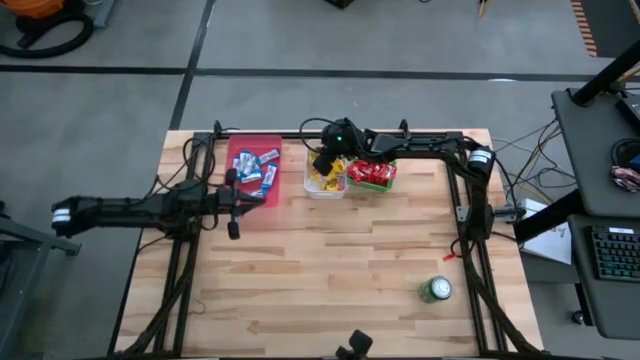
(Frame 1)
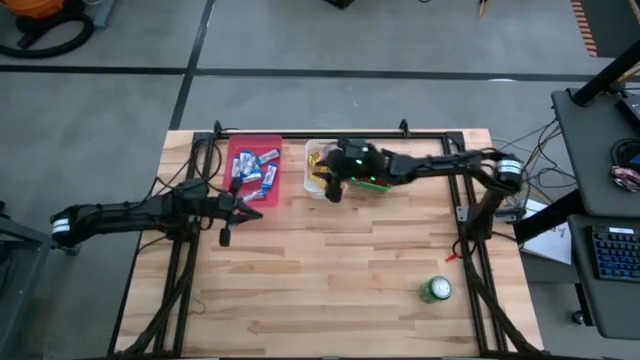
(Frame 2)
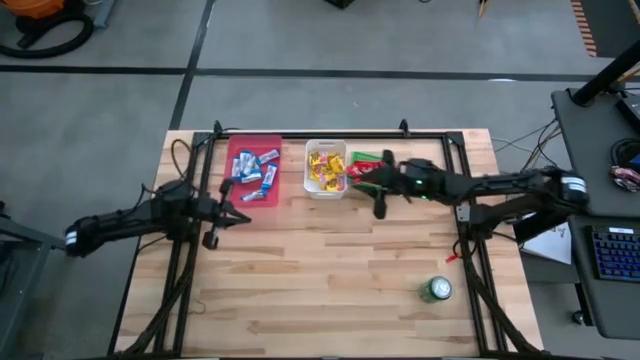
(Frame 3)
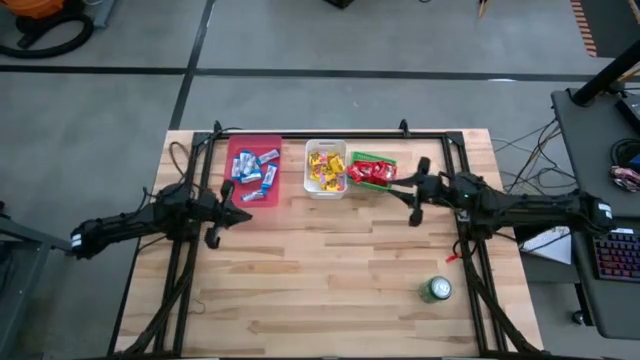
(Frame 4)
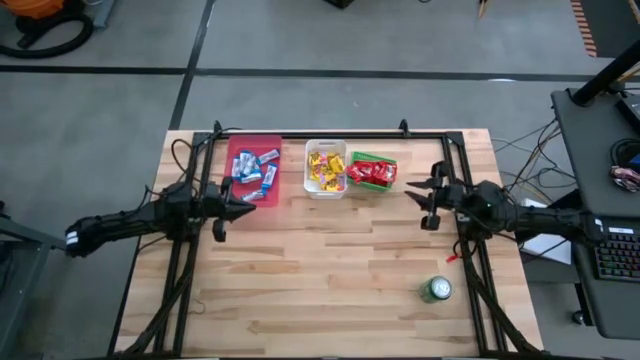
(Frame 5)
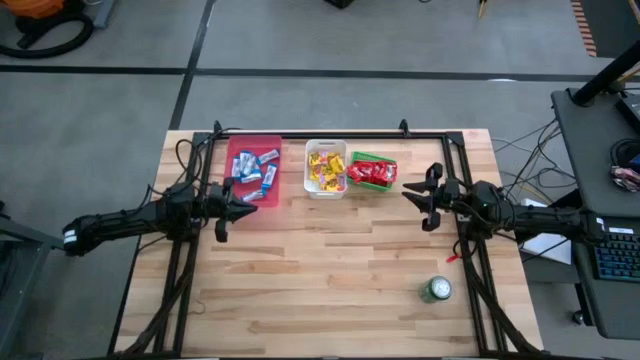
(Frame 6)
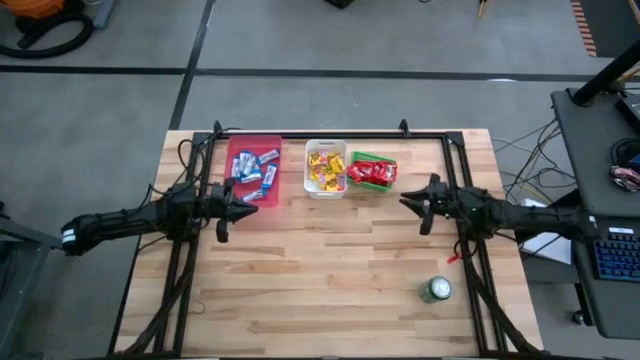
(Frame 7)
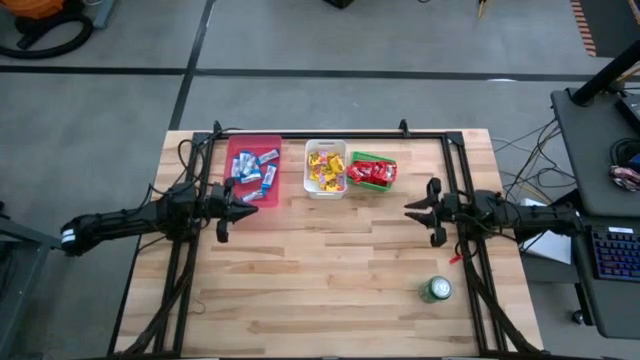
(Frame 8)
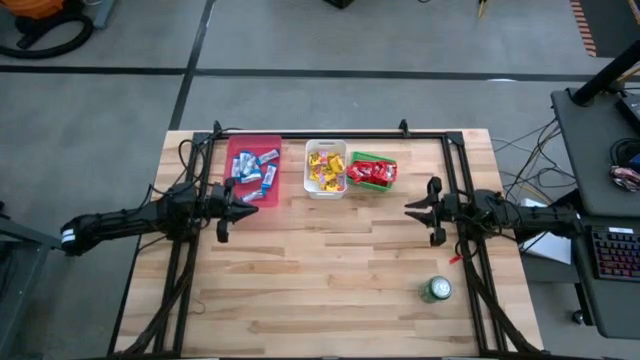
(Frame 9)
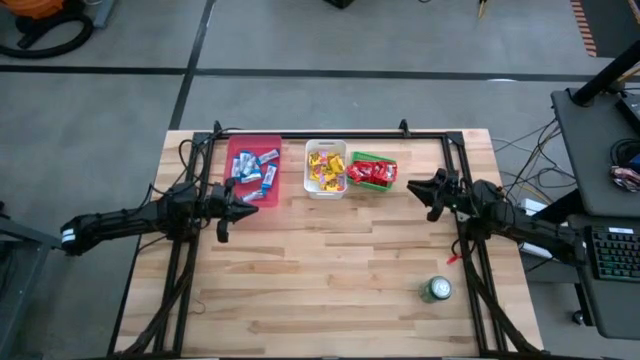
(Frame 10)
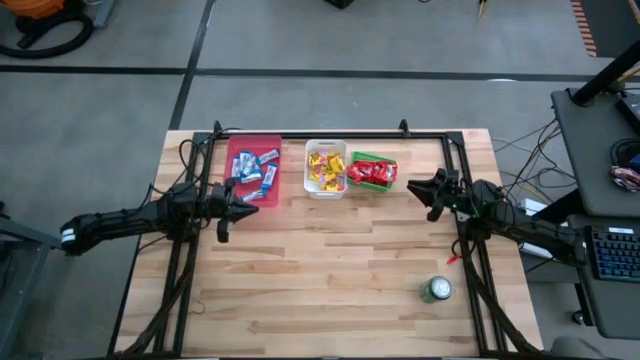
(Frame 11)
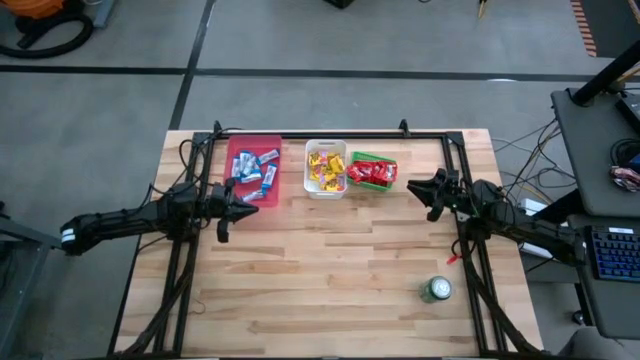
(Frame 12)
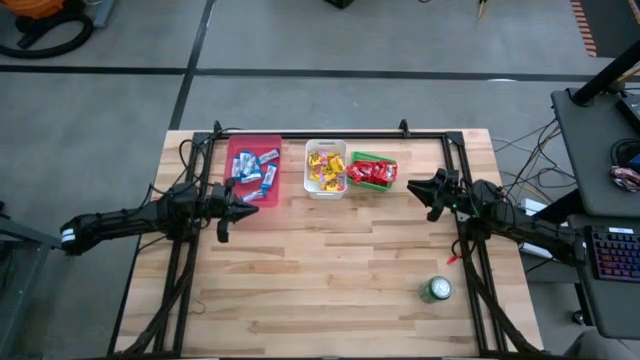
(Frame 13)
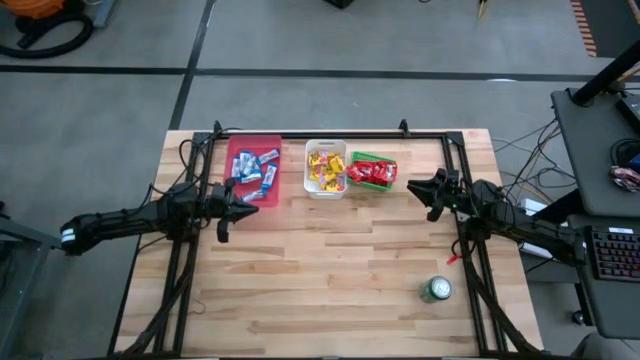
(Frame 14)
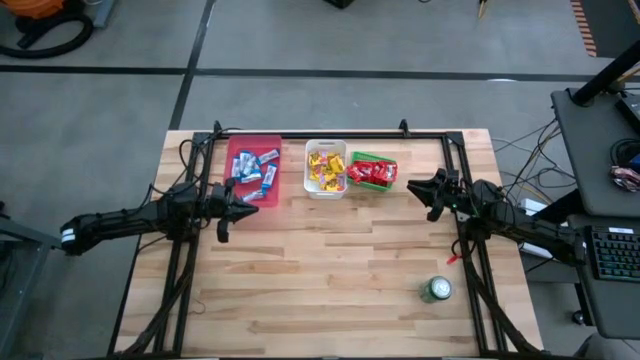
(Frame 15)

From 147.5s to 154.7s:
Task: Sort candy
Return to Home Position

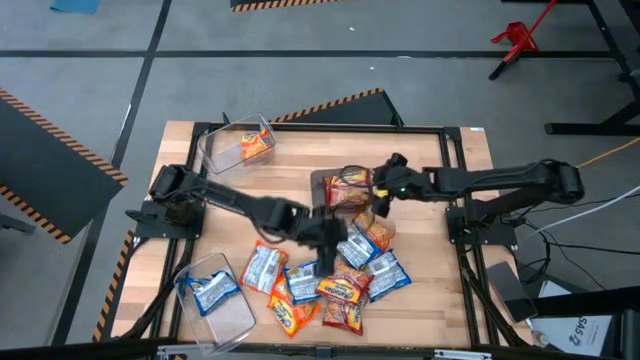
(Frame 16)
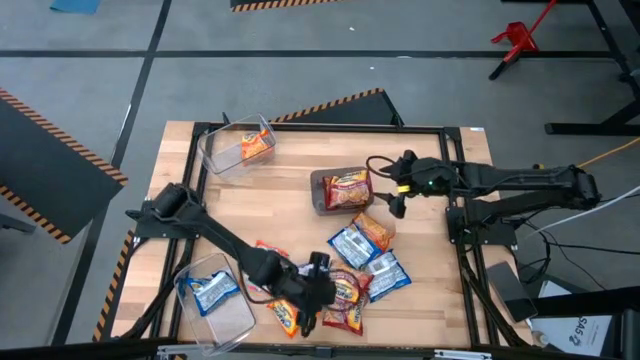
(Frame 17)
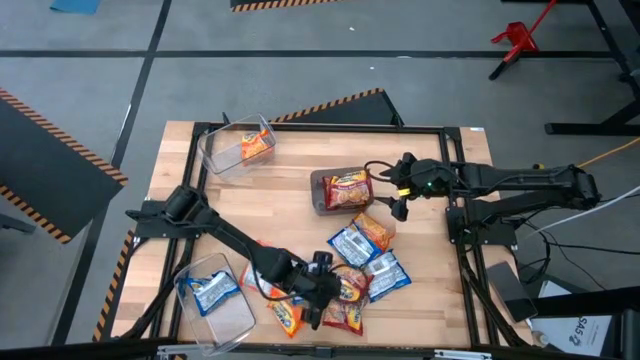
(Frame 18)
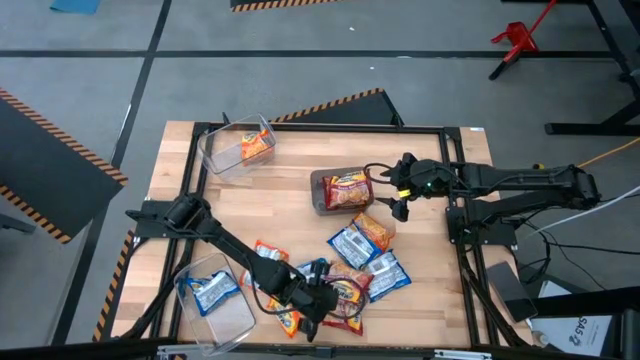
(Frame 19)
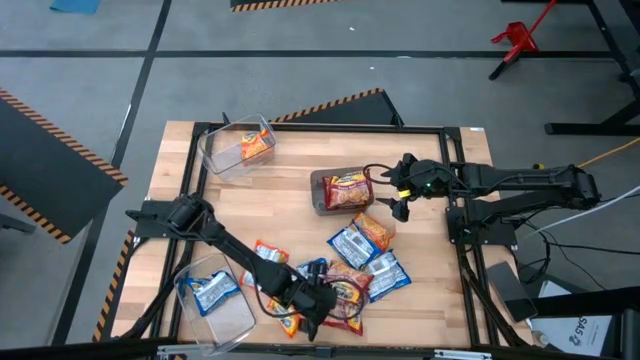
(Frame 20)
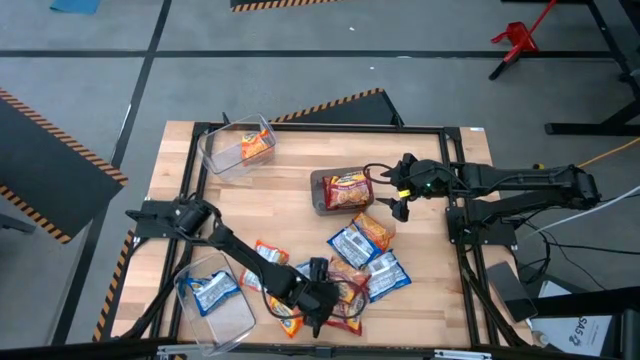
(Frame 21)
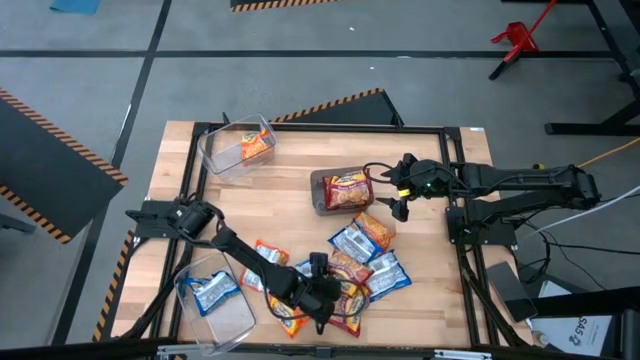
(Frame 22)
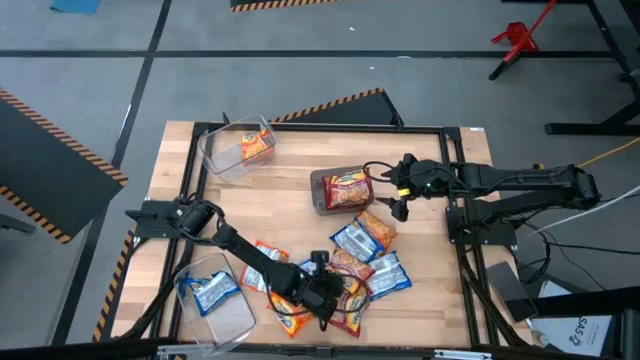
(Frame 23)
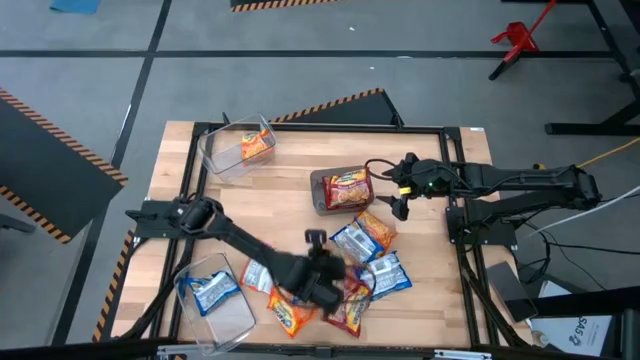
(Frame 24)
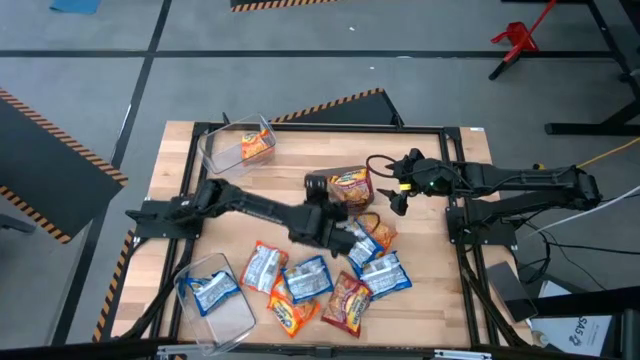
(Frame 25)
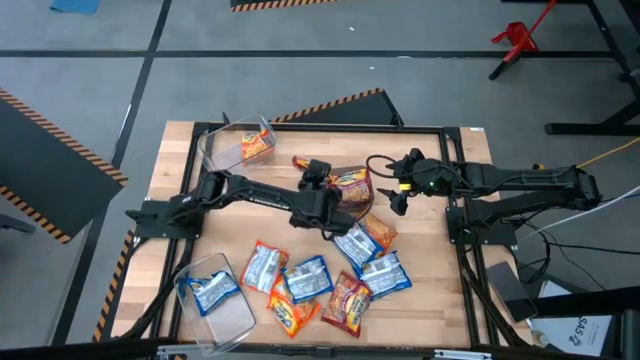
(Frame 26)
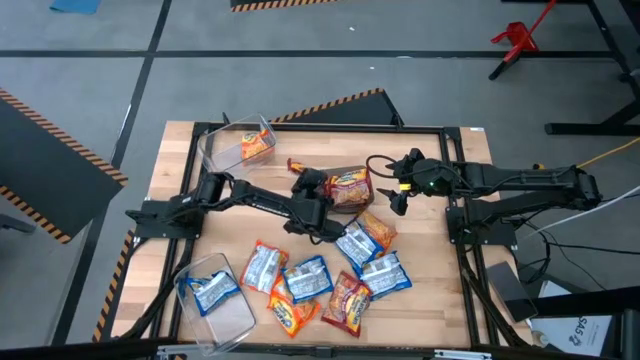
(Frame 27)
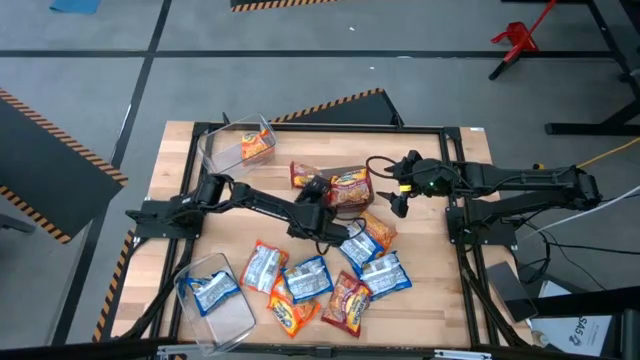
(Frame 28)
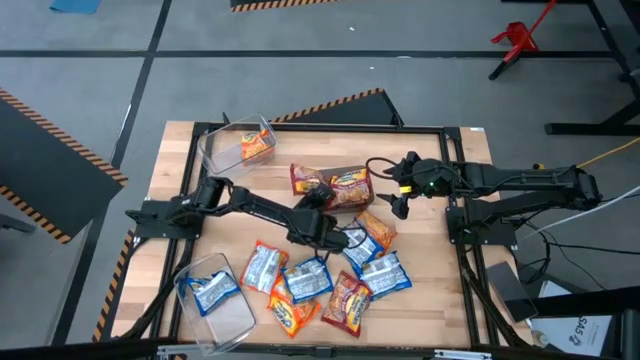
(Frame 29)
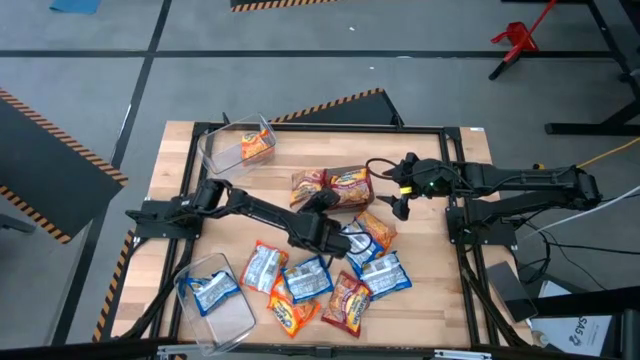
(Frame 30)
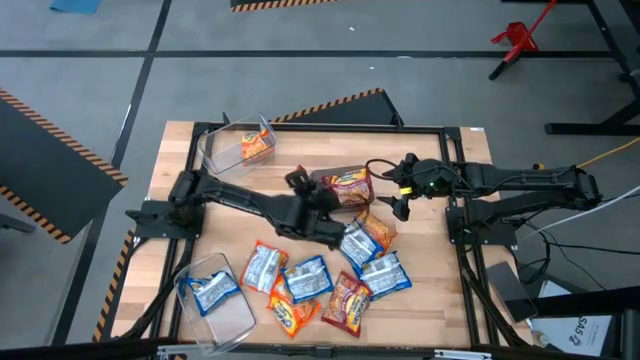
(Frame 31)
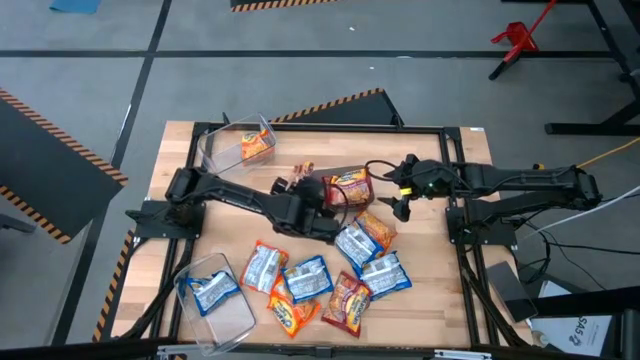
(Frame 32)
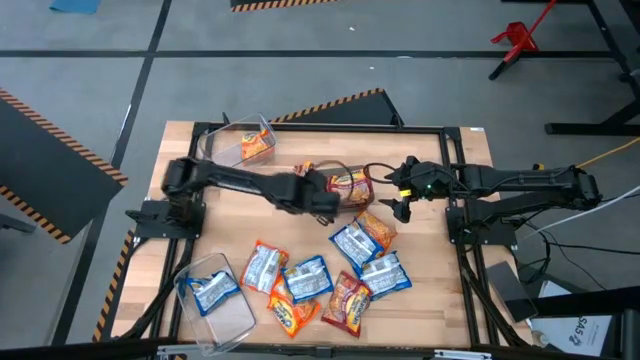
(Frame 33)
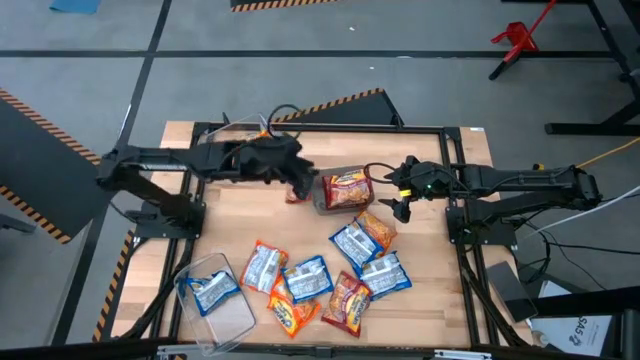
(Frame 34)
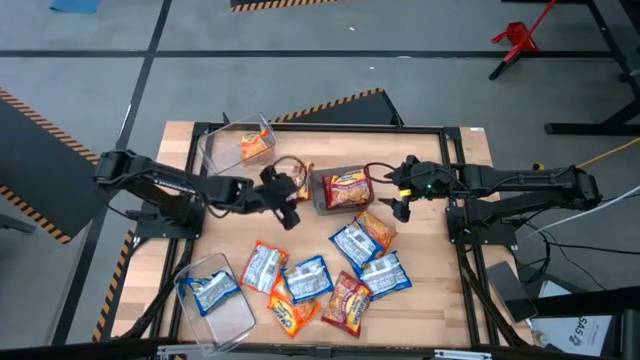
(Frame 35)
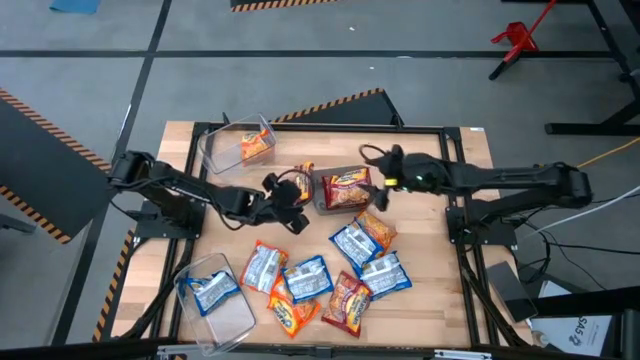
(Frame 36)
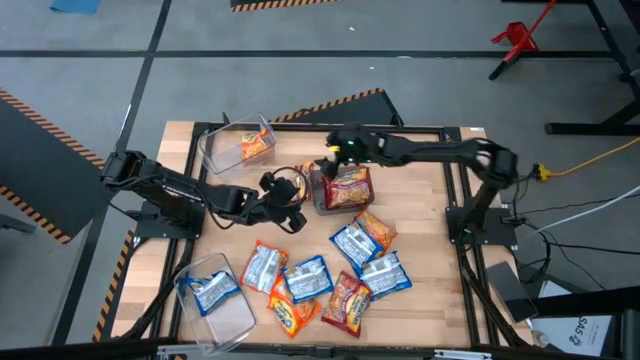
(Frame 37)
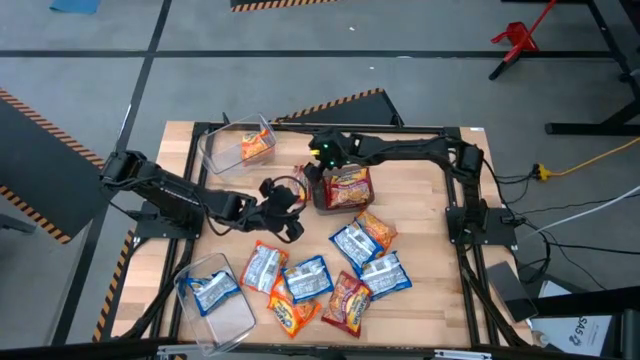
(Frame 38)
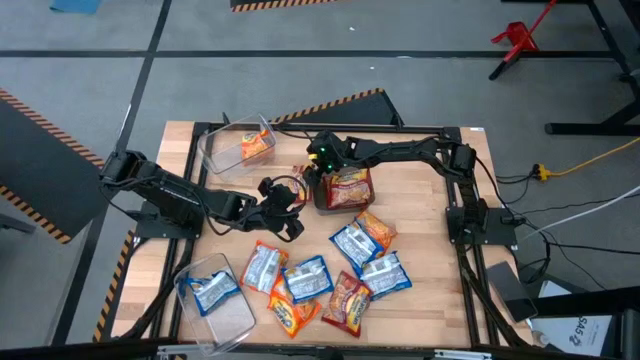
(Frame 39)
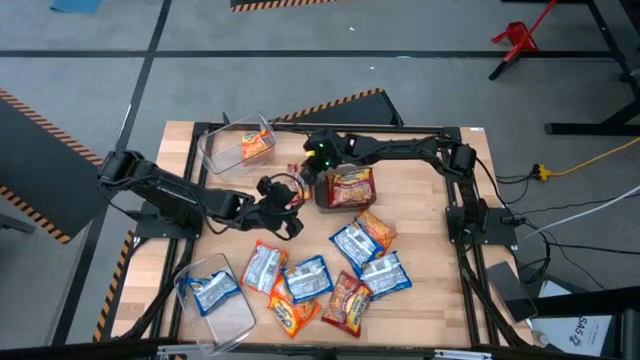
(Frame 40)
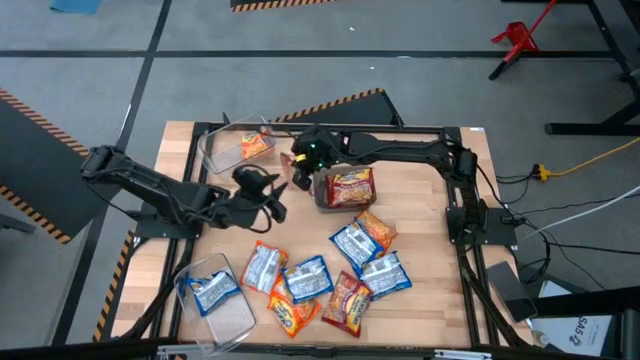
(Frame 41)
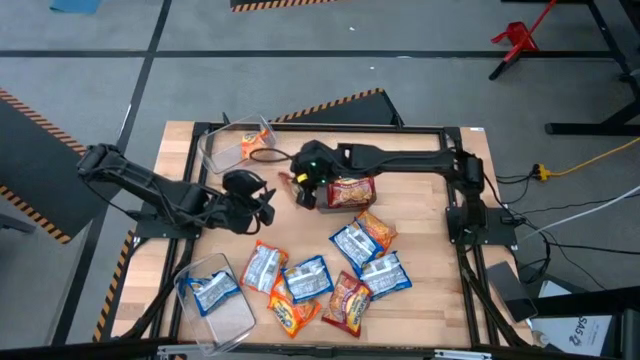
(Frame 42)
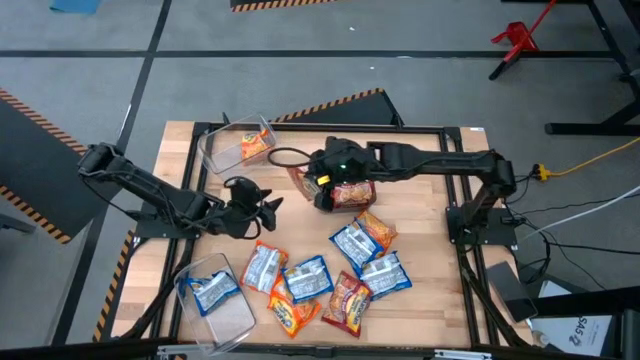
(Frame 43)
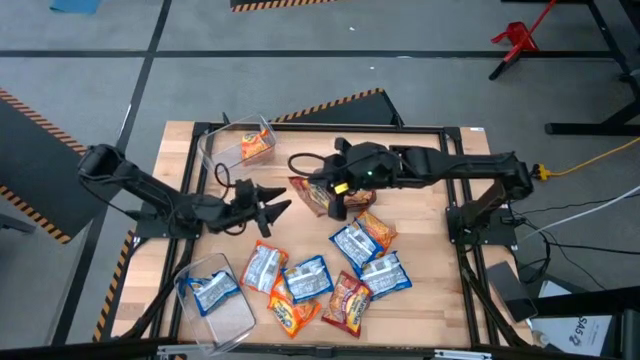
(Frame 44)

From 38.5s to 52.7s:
Task: Sort Maruchan noodles
Put the red noodle pack into the black bin
